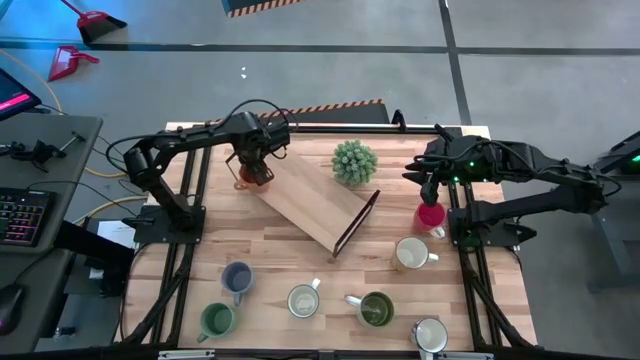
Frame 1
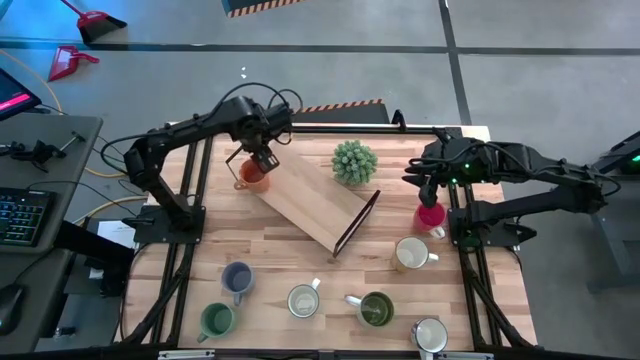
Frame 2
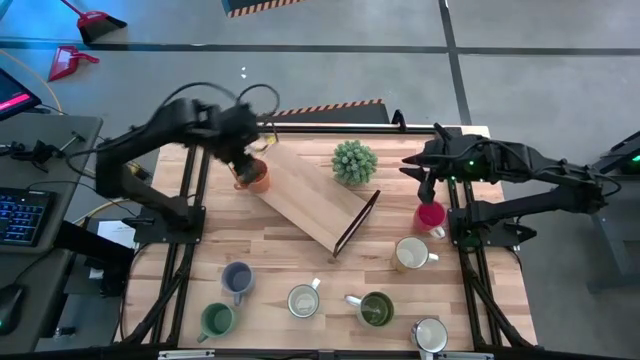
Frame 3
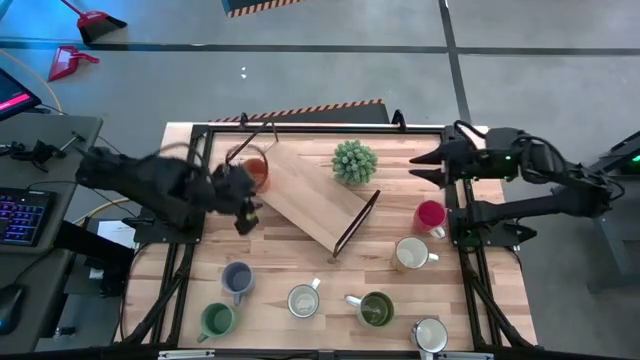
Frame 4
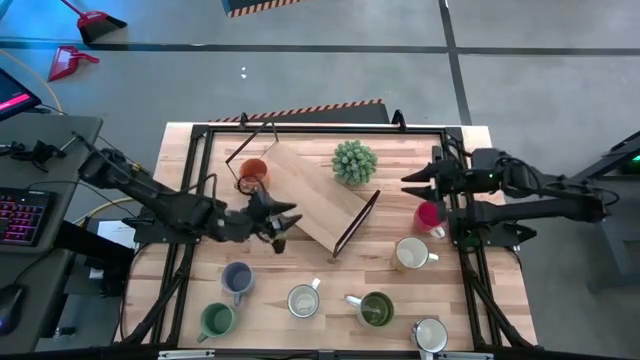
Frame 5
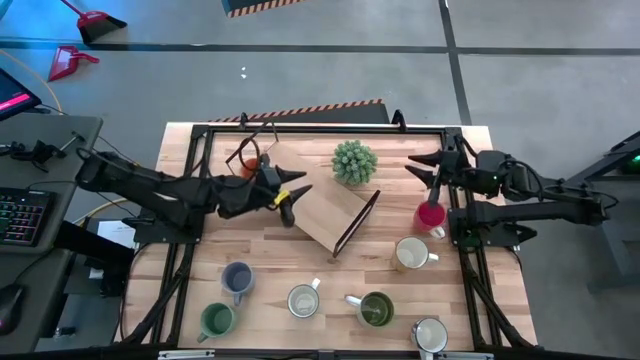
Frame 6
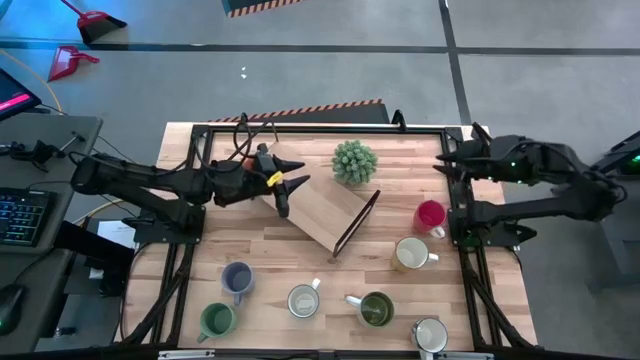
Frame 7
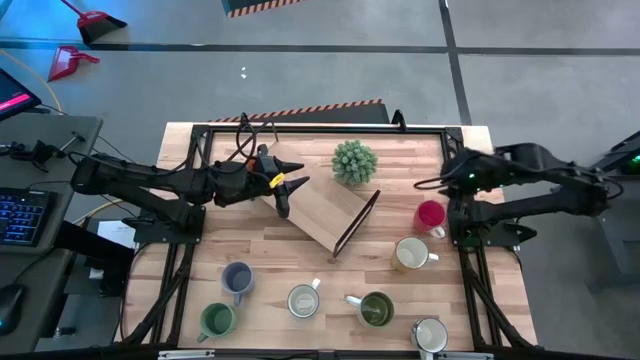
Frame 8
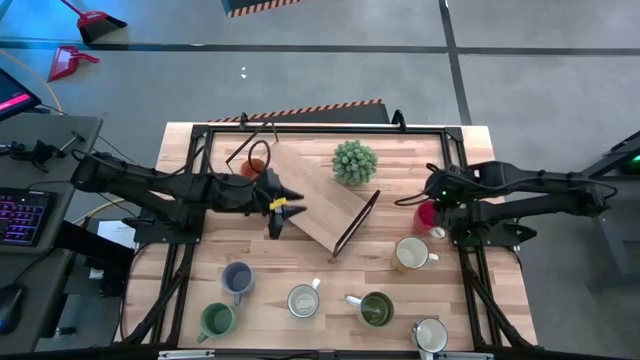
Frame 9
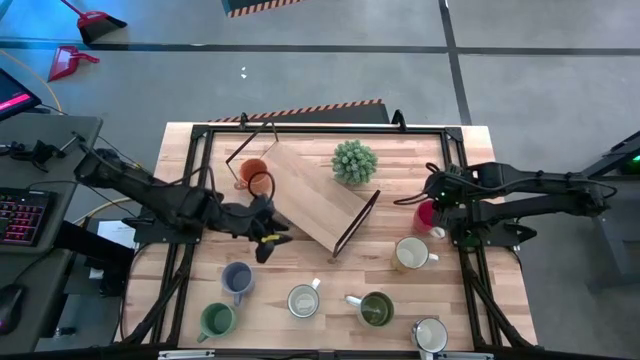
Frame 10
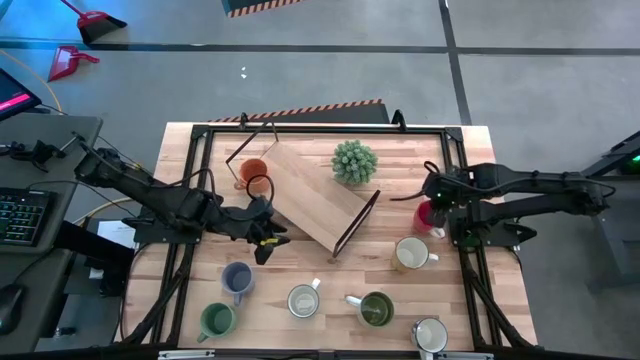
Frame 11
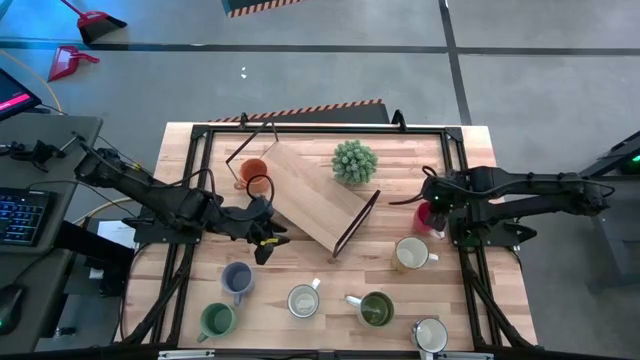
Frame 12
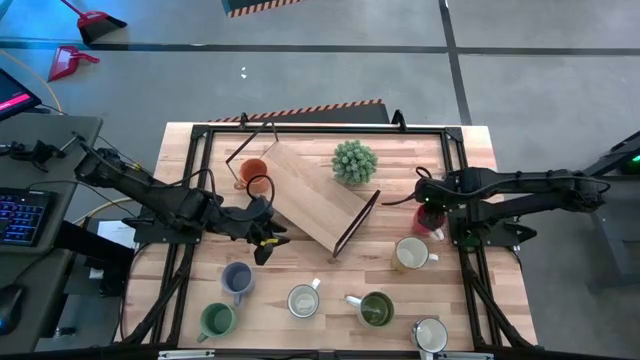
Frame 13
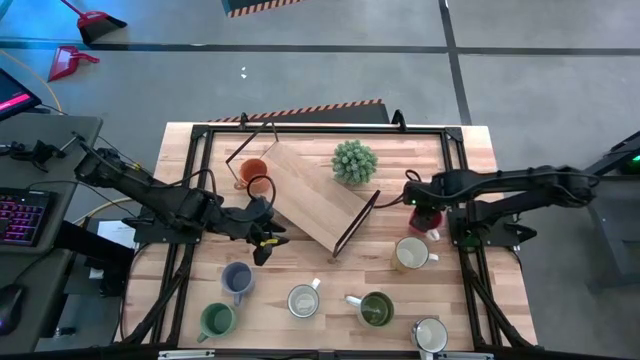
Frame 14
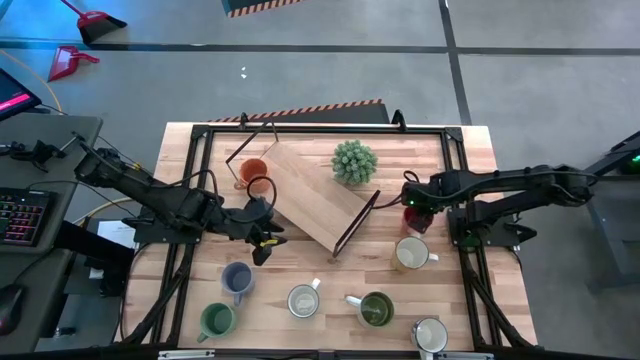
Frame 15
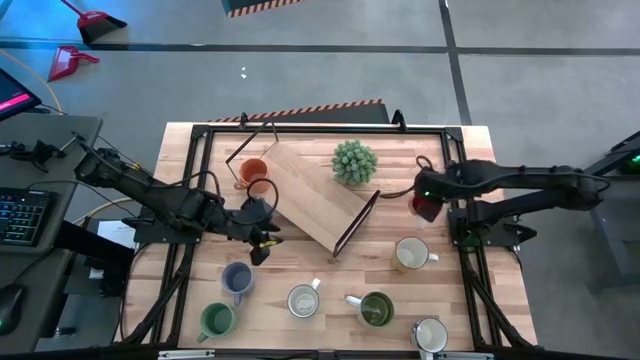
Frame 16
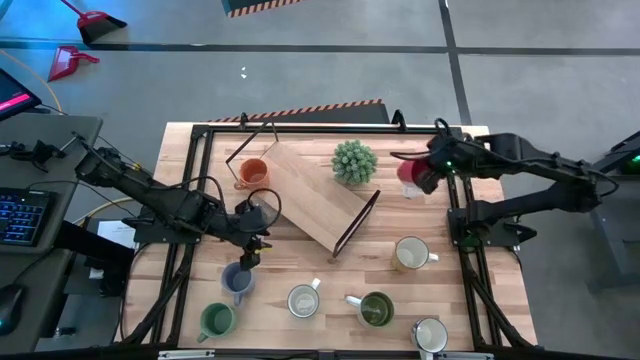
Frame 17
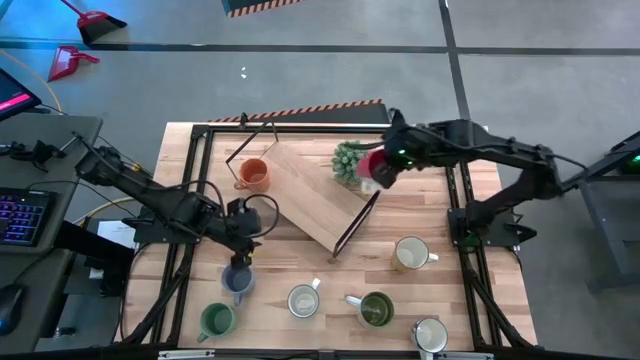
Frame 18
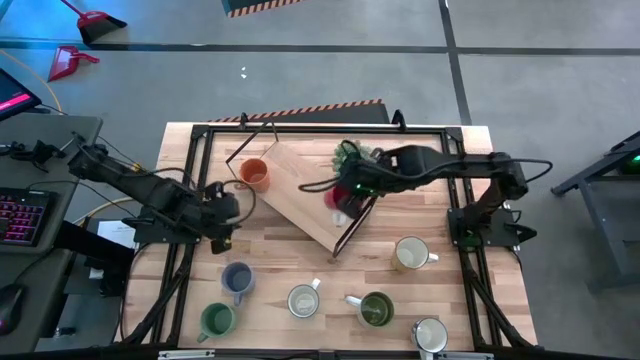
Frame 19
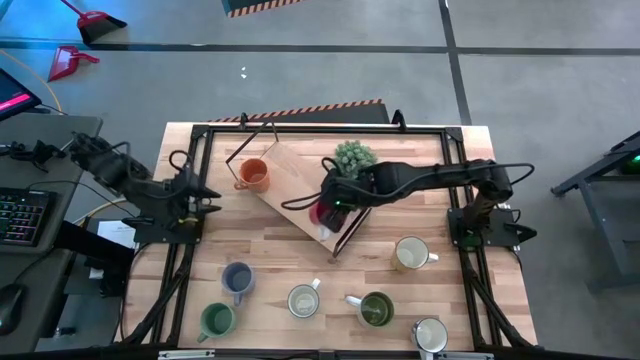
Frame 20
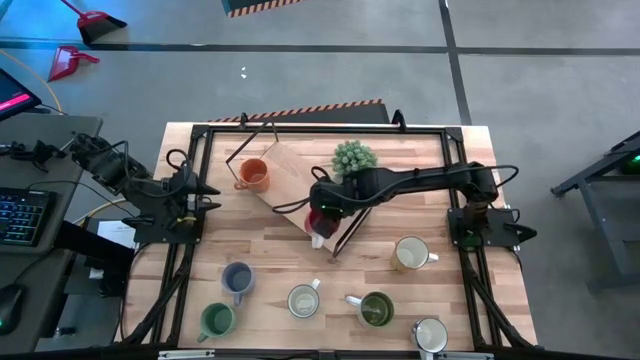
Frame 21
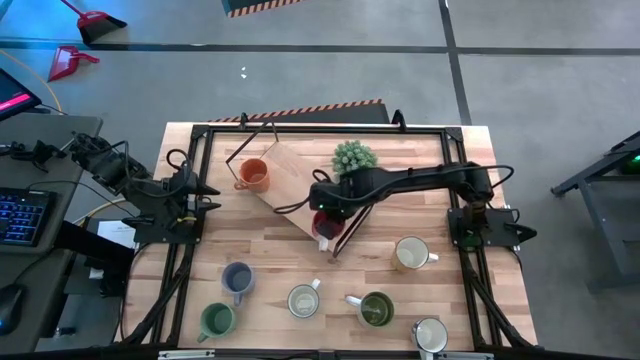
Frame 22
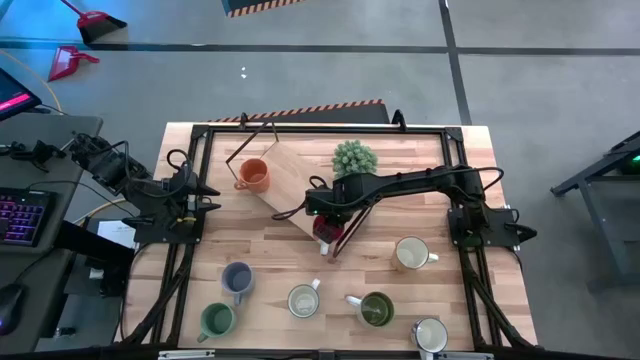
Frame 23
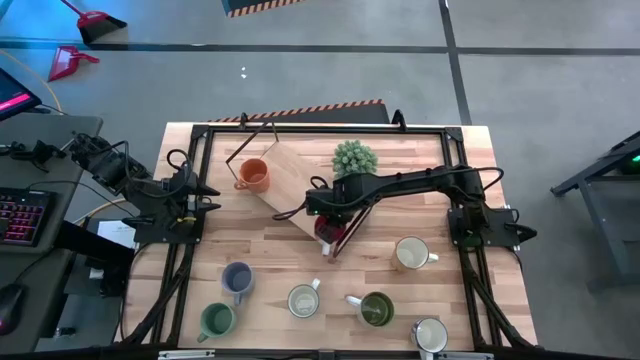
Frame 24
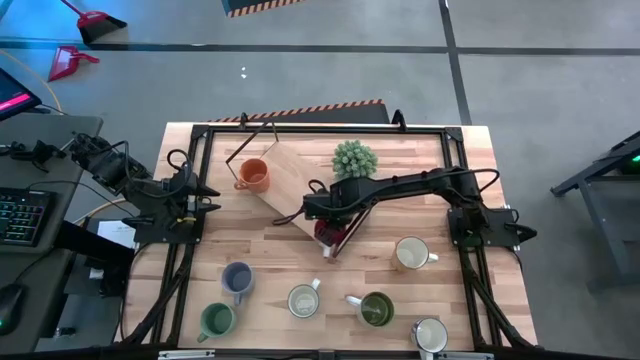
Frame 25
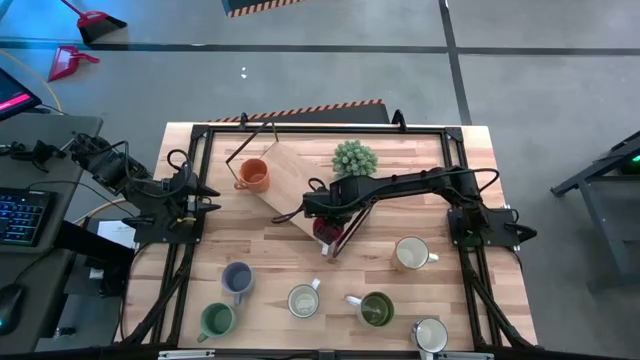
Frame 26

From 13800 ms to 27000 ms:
Task: Place coffee mugs
Put the red mug on the shelf

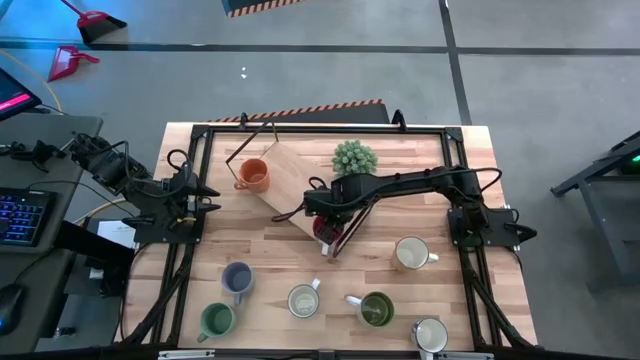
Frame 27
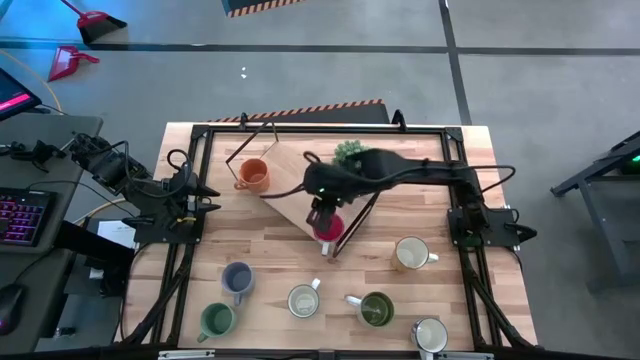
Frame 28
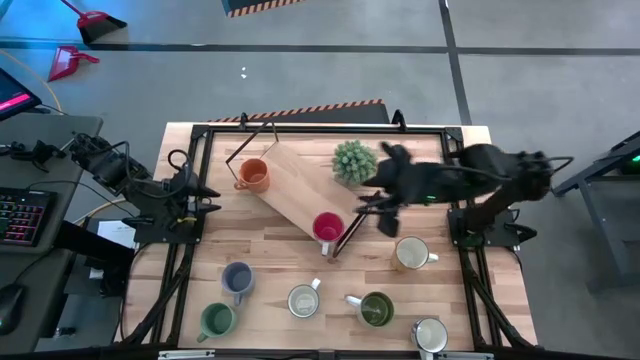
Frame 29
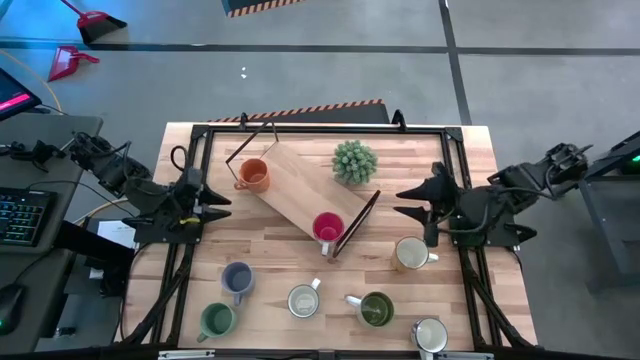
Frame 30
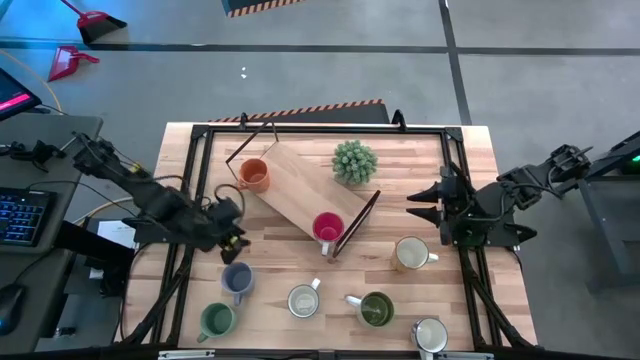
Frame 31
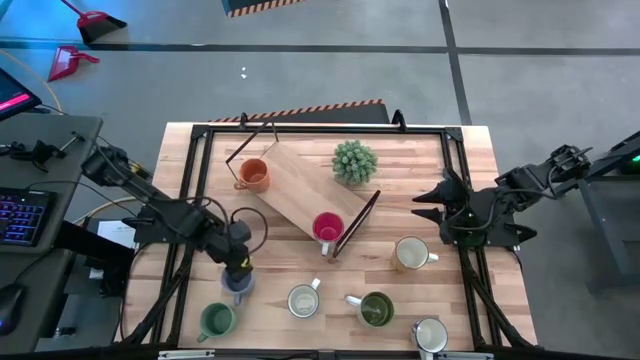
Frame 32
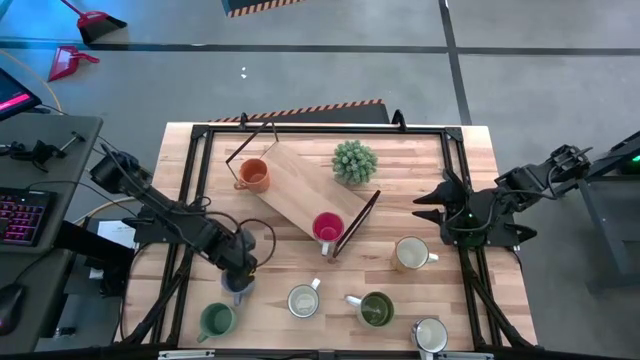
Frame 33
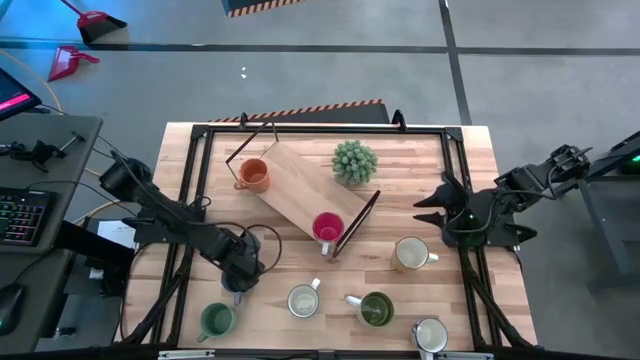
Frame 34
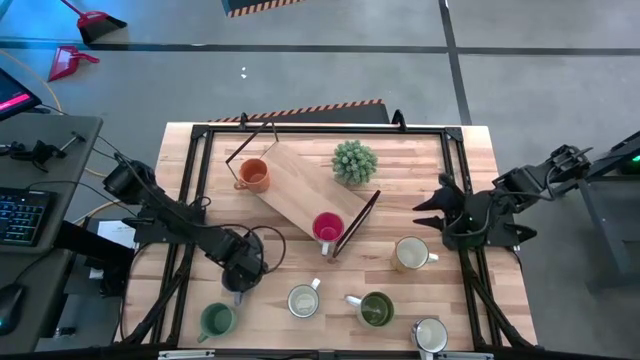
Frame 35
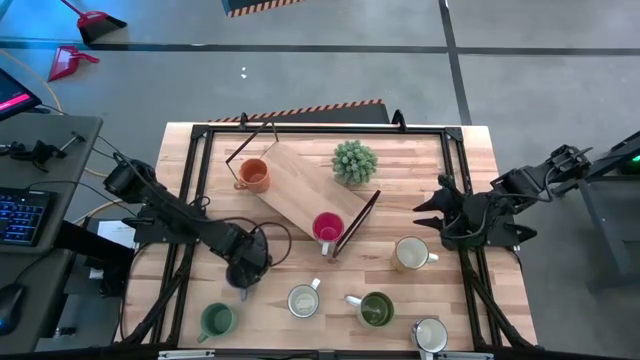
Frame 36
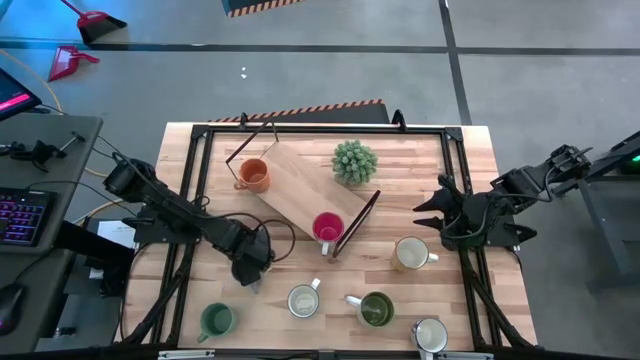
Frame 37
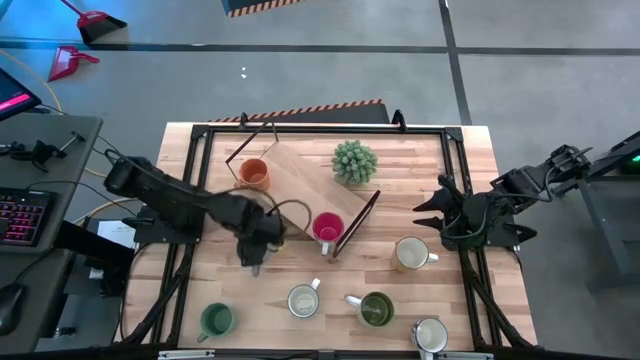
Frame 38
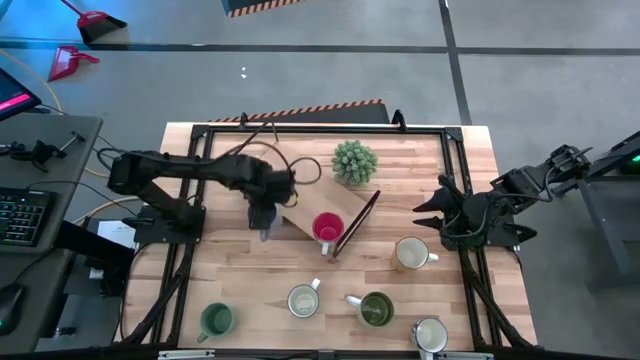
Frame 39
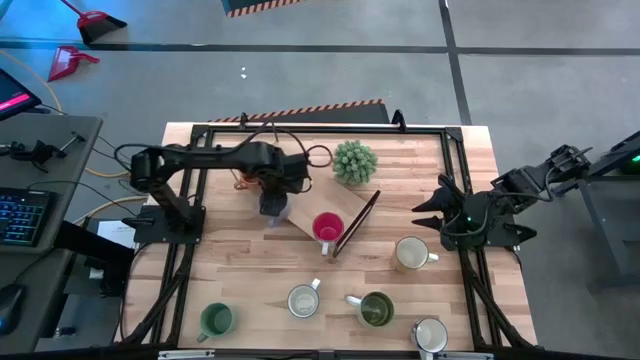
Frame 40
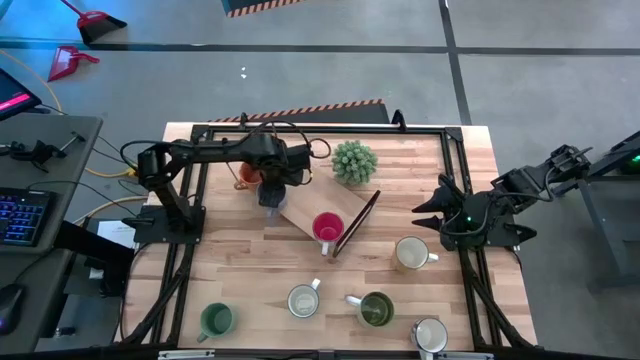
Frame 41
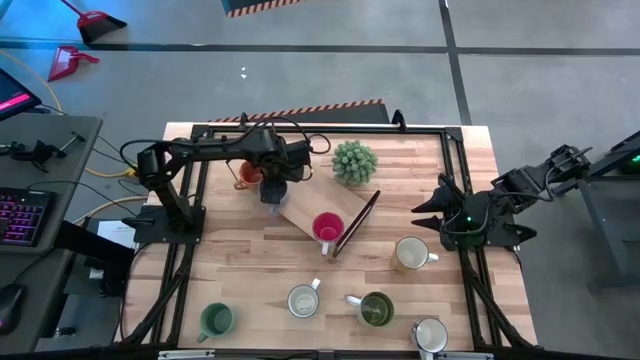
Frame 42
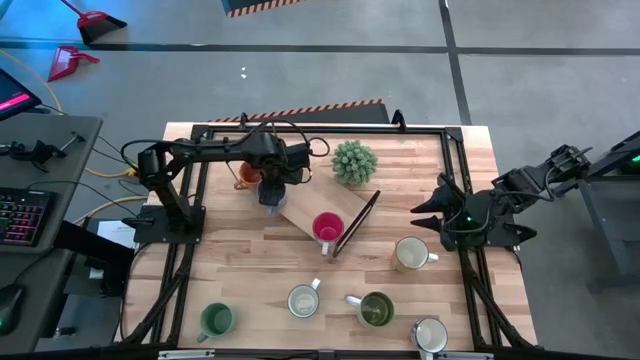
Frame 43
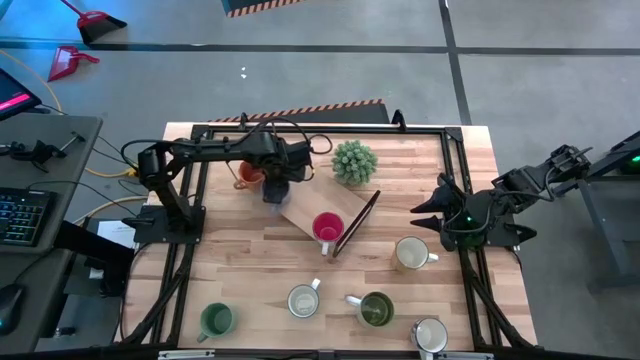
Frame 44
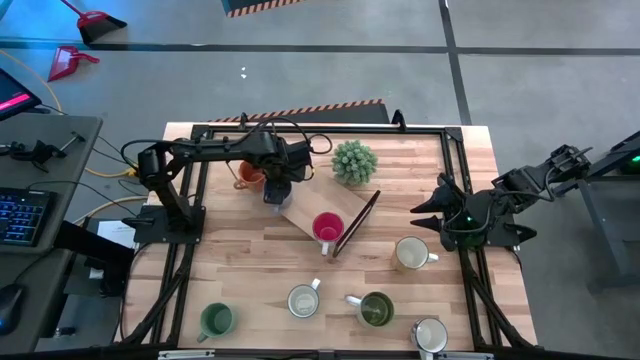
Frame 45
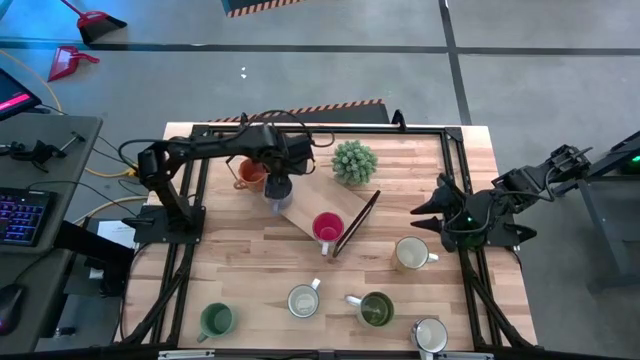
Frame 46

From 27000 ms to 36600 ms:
Put the purple mug on the shelf
